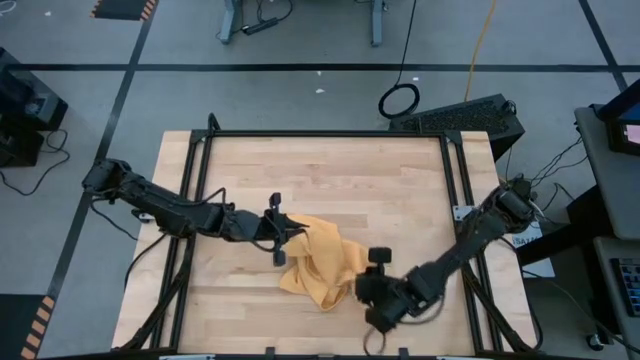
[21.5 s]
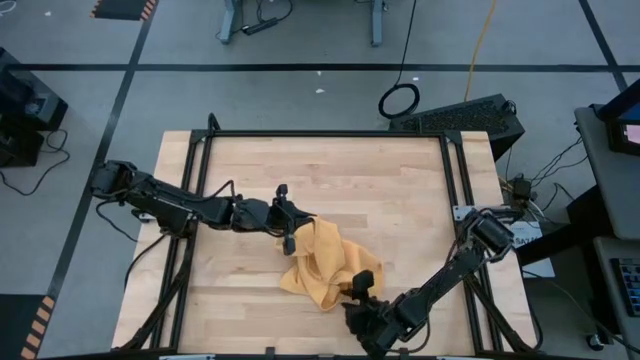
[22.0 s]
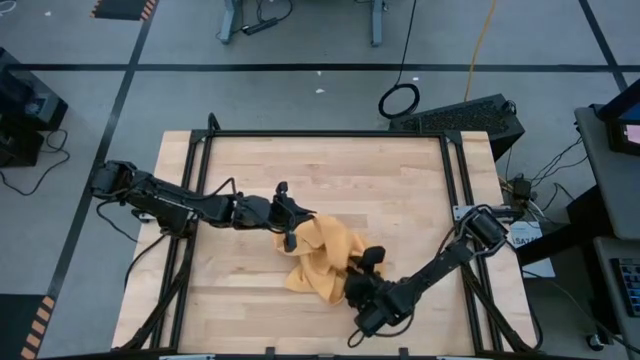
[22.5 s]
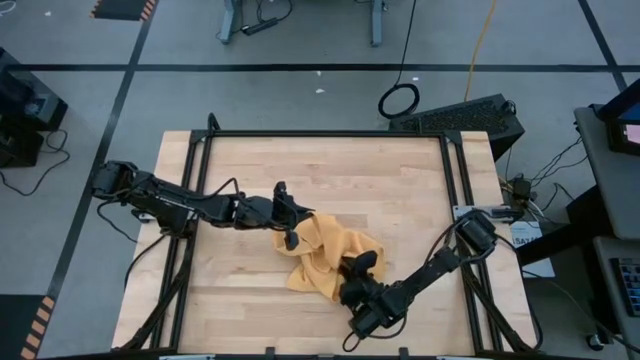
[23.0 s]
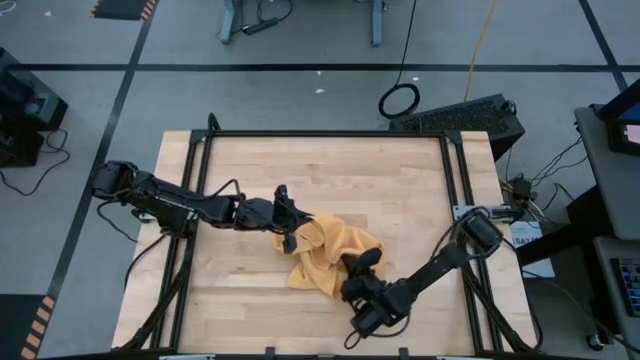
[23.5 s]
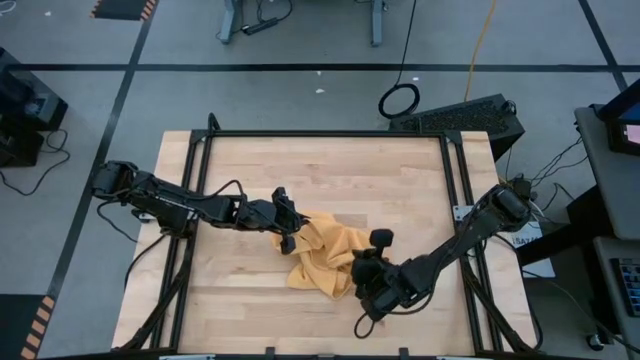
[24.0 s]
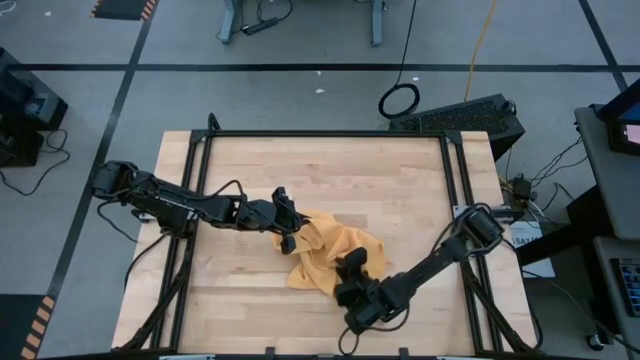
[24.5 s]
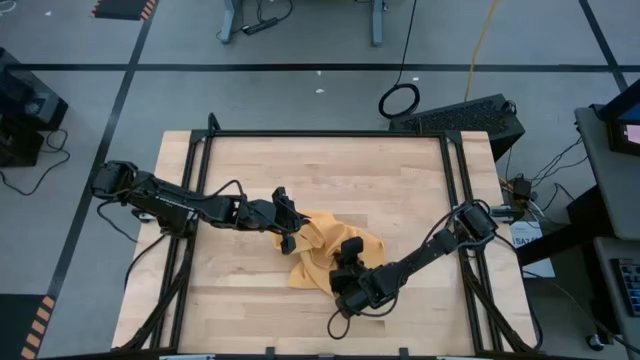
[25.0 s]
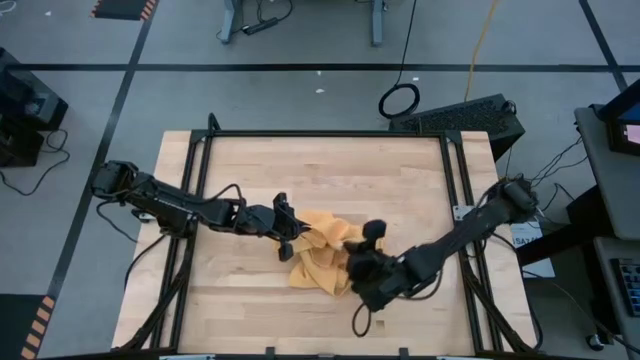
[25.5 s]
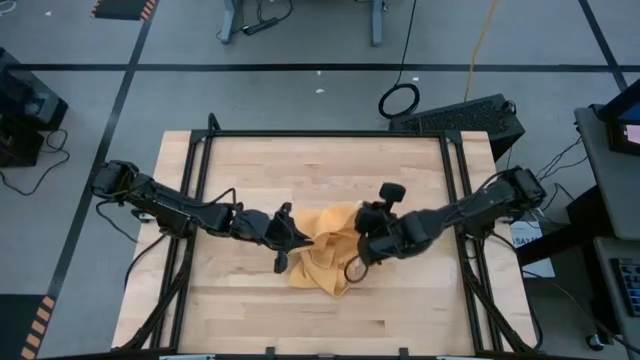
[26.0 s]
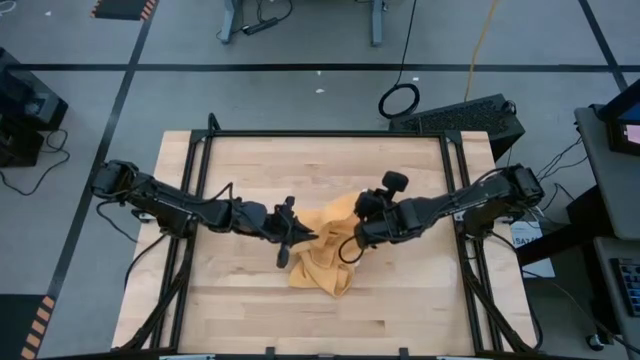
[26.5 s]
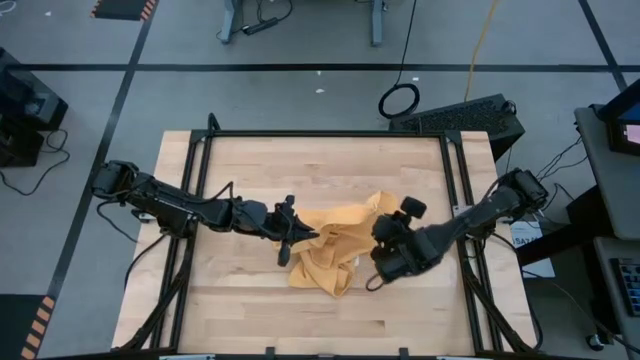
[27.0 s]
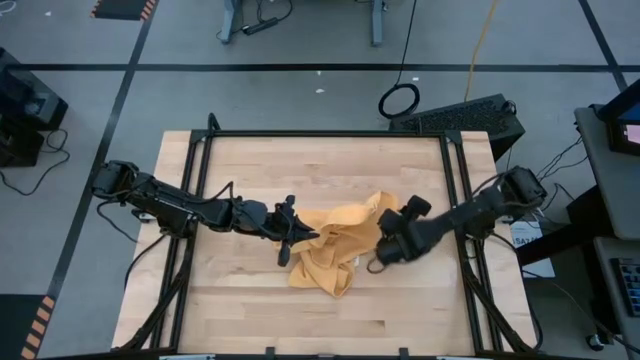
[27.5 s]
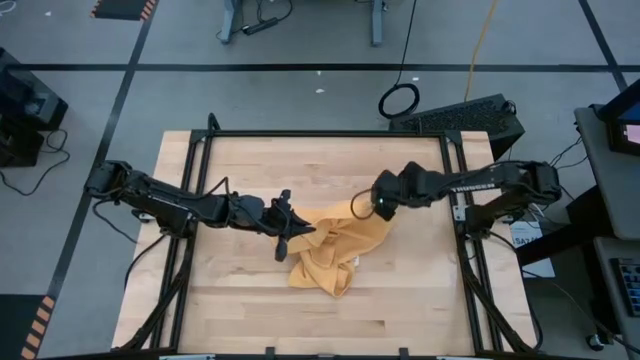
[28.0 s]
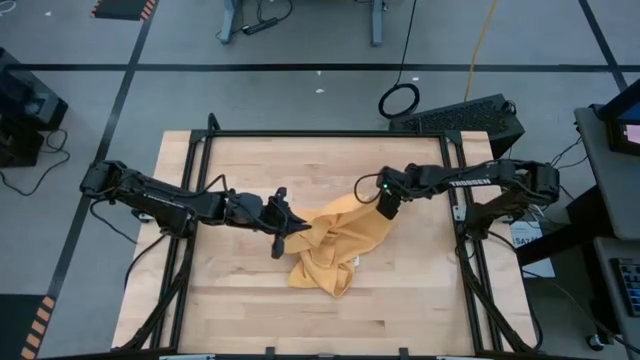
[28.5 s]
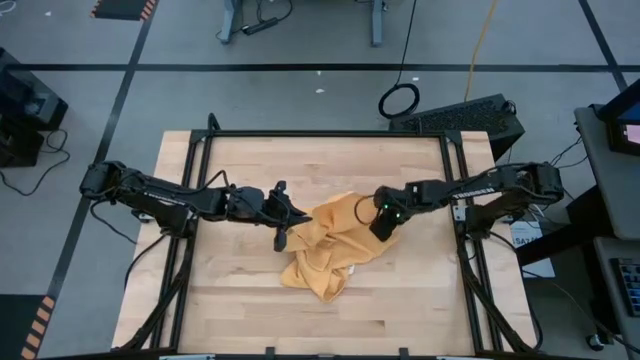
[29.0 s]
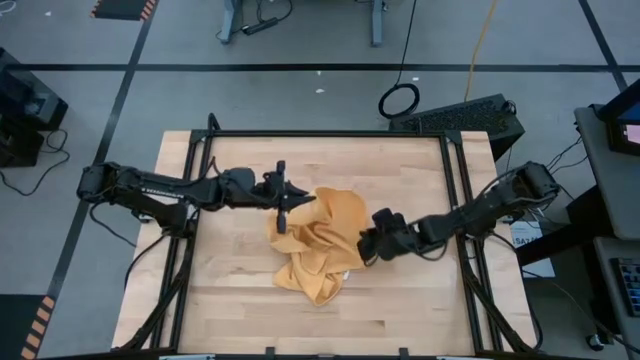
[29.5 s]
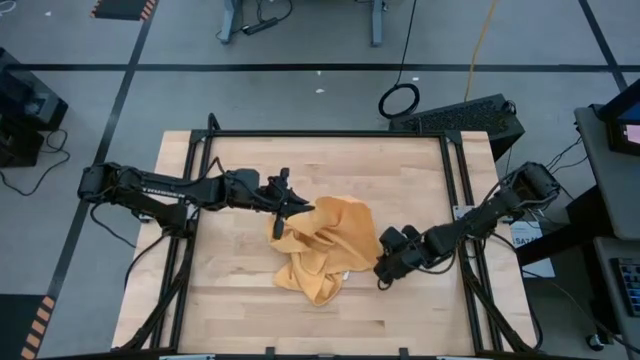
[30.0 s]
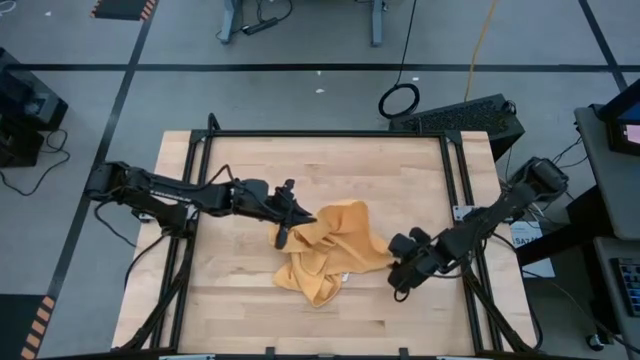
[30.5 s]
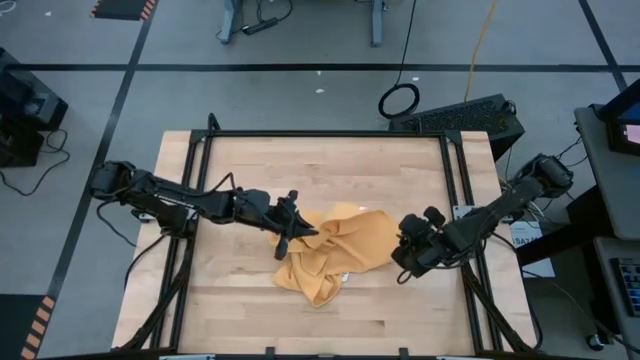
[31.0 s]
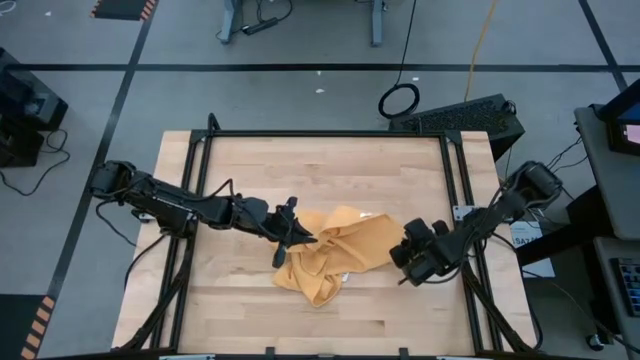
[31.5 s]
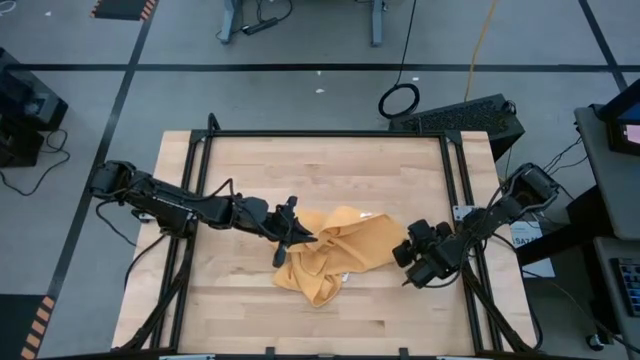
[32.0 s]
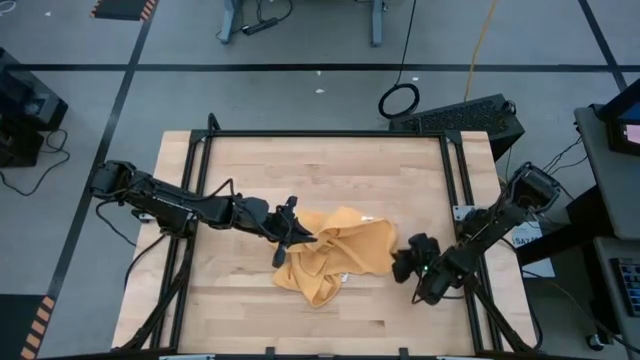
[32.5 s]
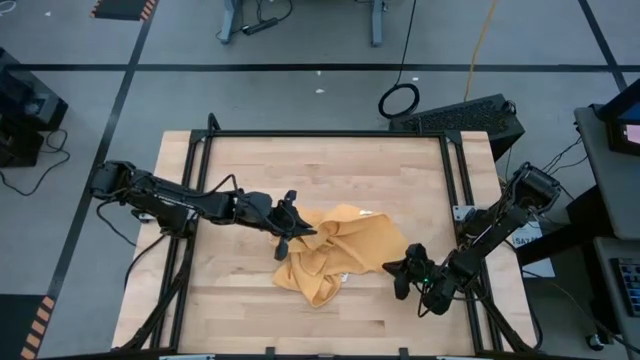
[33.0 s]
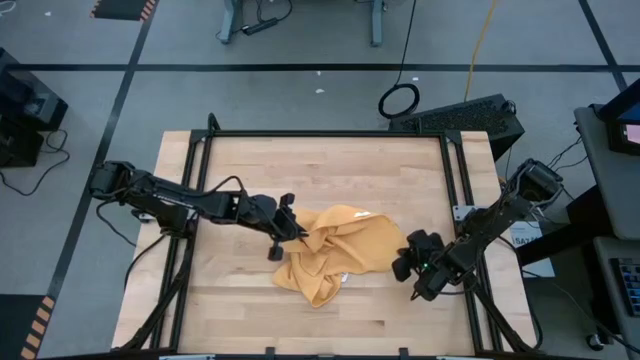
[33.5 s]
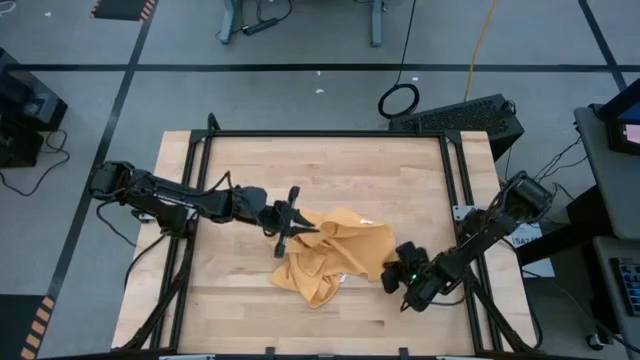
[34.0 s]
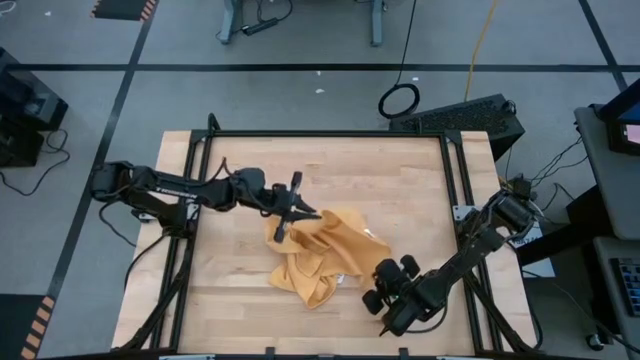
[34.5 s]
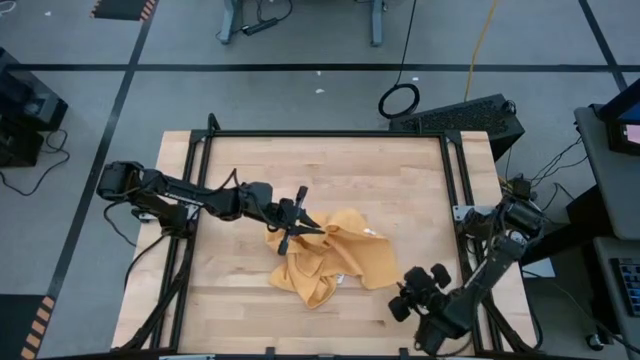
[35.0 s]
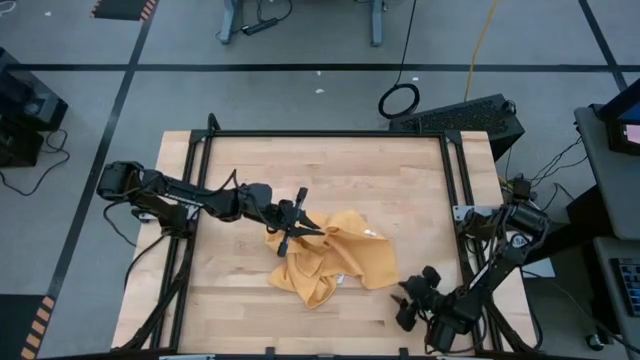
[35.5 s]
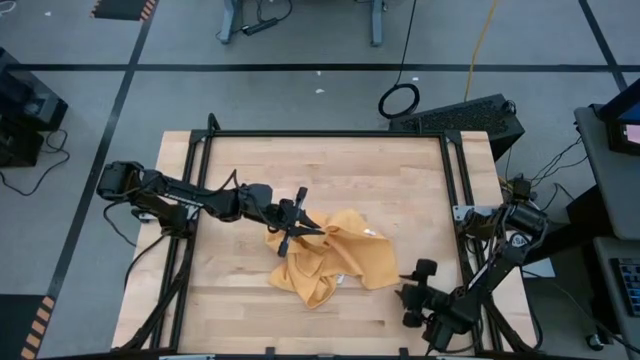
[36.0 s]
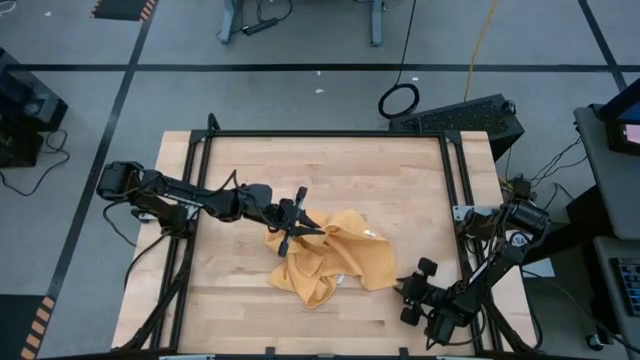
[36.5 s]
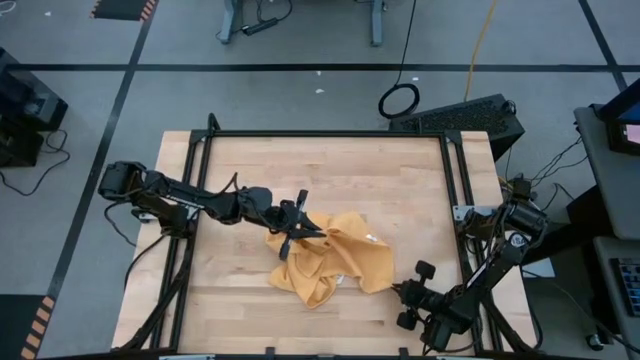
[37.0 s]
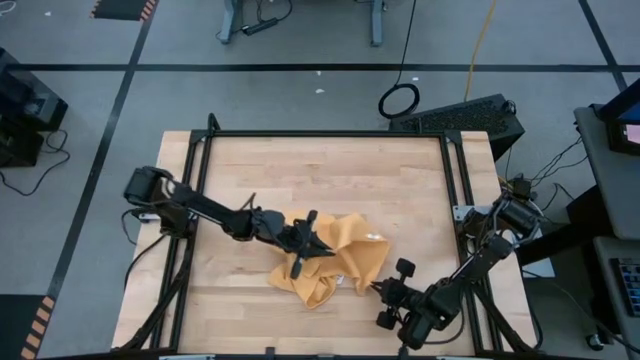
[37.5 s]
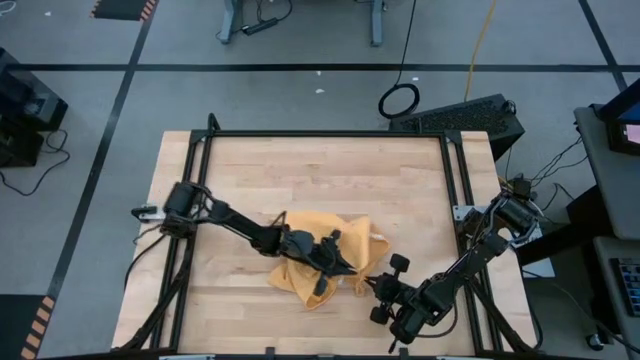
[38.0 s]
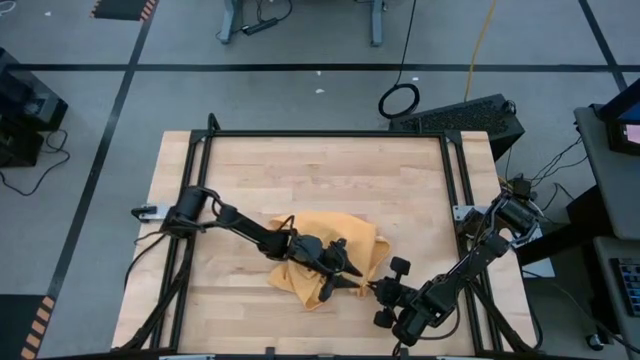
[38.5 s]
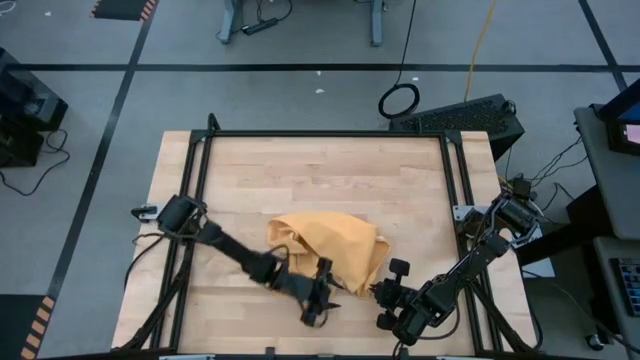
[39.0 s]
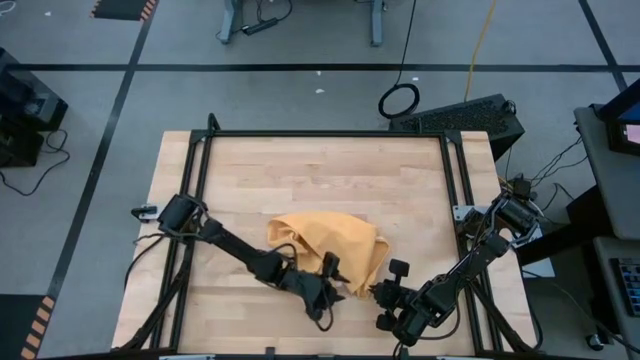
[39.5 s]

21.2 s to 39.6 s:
Task: Roll towel
Roll the yellow towel

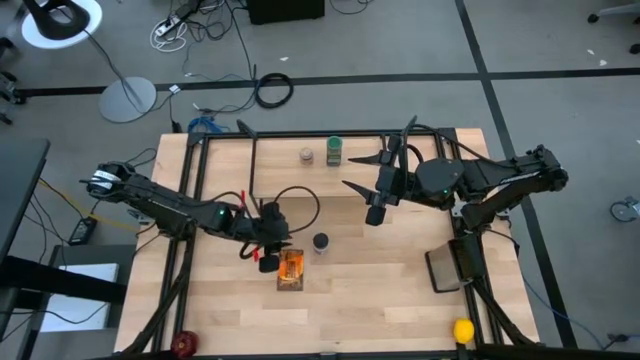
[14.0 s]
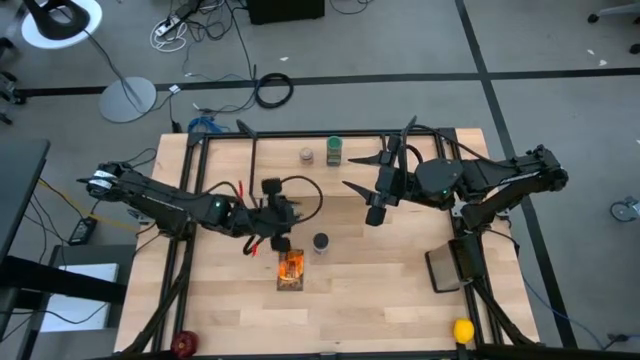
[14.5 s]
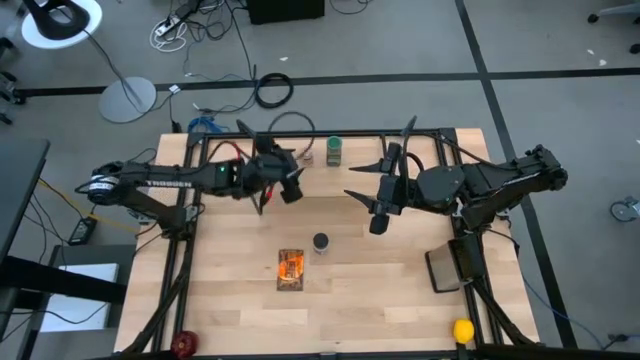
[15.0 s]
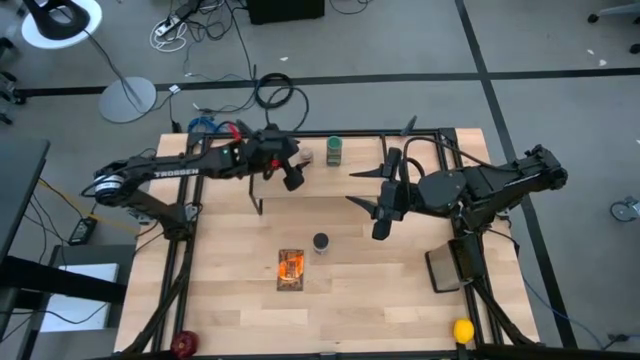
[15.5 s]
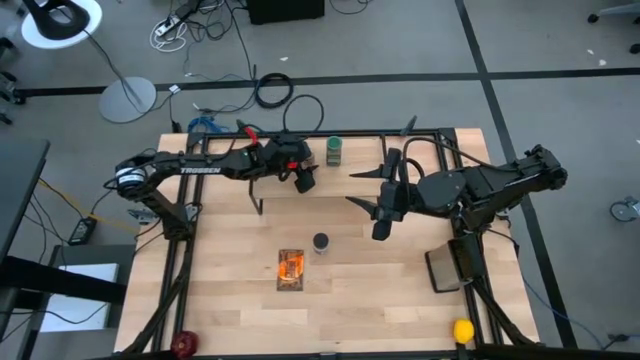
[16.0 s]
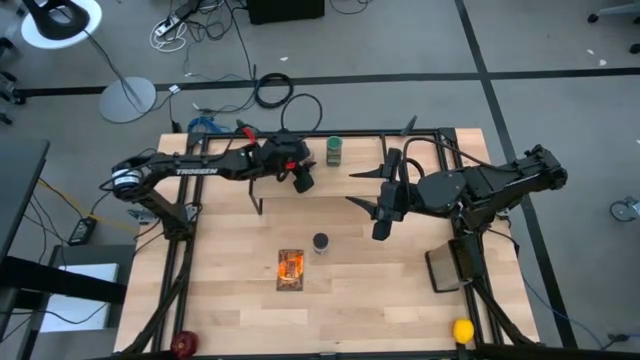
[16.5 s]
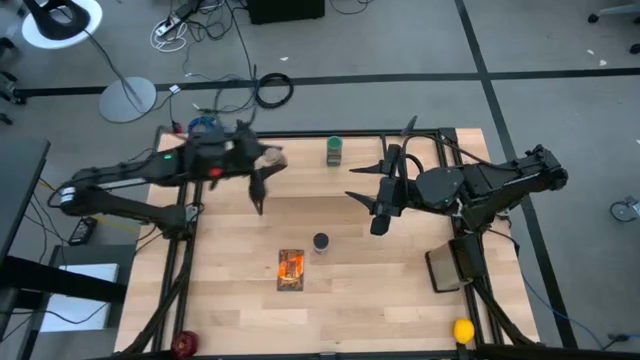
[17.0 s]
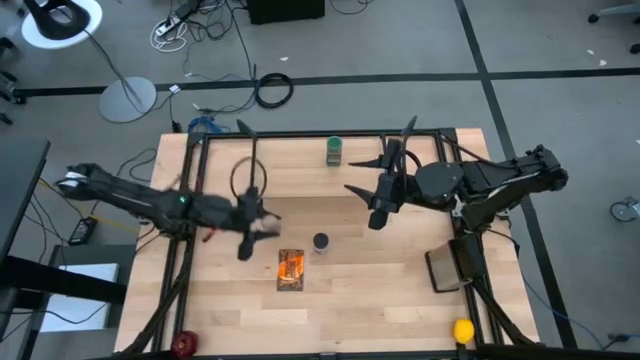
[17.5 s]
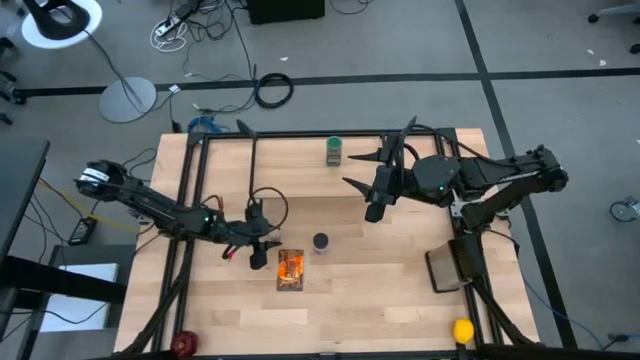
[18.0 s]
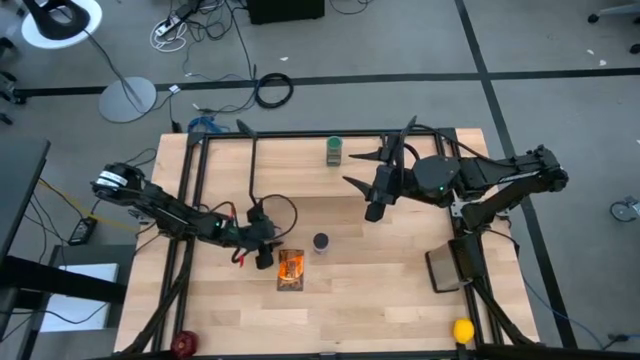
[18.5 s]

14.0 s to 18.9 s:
Task: Shelf spices
Remove the brown seasoning bottle from the shelf
